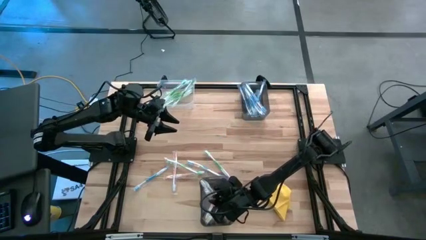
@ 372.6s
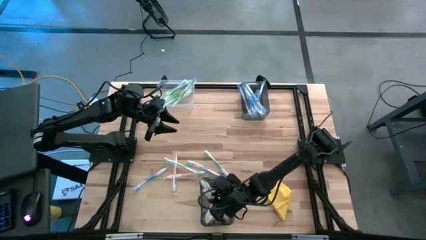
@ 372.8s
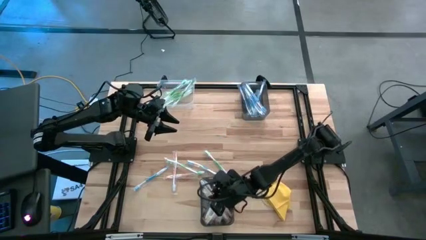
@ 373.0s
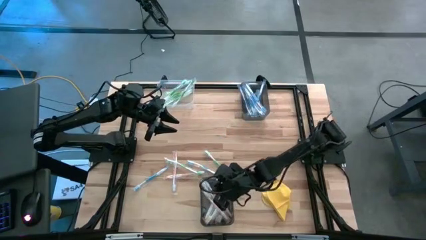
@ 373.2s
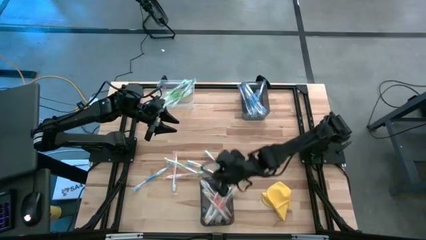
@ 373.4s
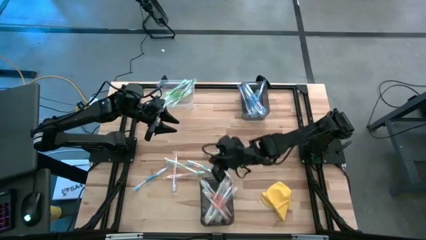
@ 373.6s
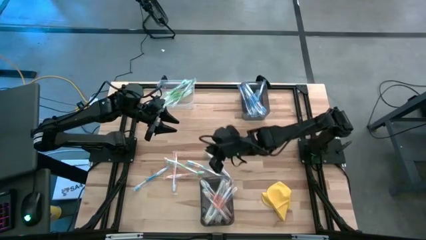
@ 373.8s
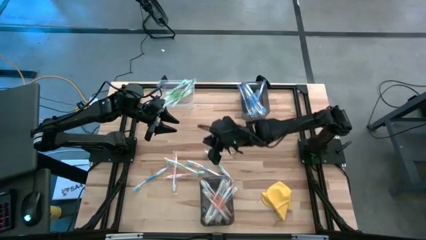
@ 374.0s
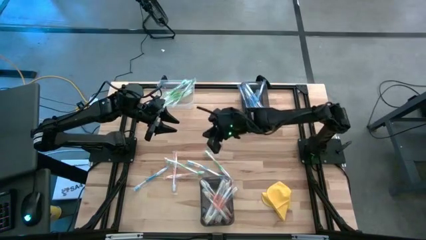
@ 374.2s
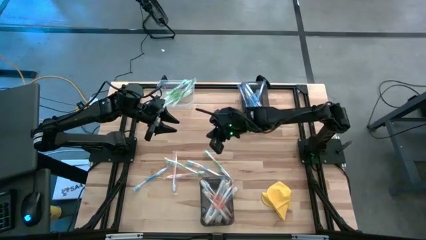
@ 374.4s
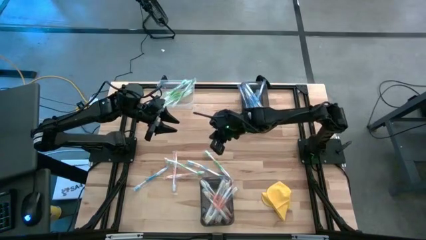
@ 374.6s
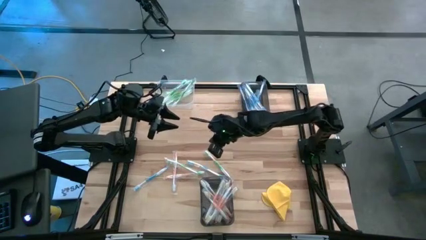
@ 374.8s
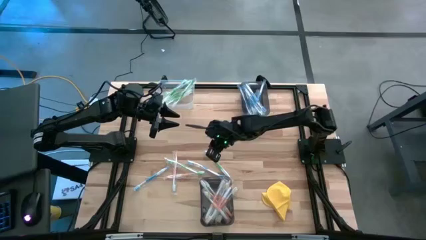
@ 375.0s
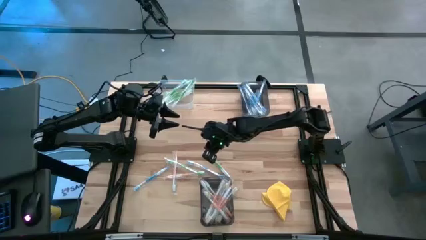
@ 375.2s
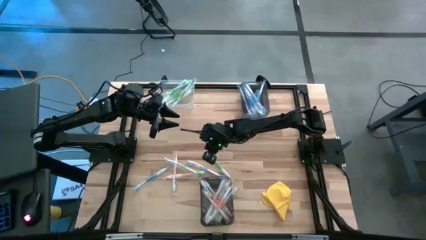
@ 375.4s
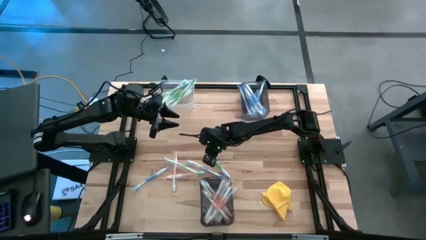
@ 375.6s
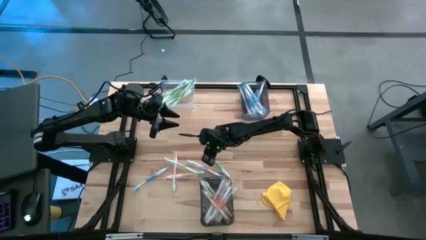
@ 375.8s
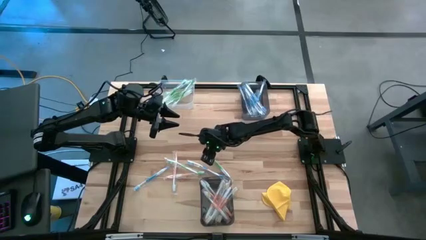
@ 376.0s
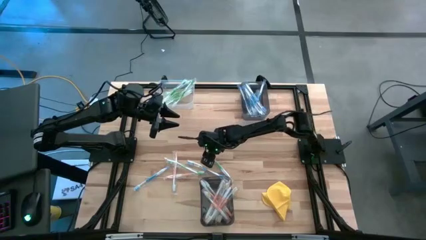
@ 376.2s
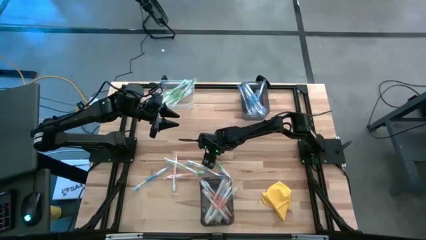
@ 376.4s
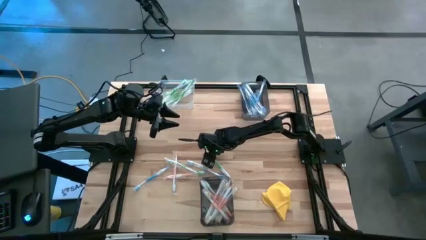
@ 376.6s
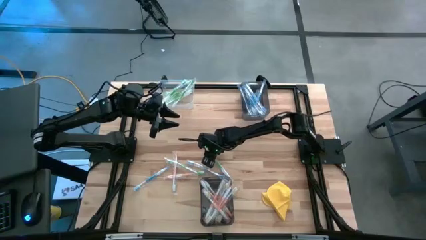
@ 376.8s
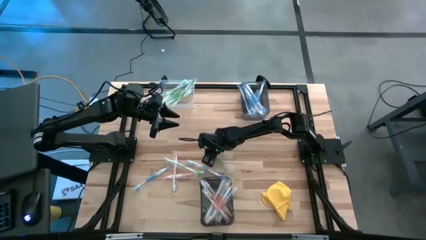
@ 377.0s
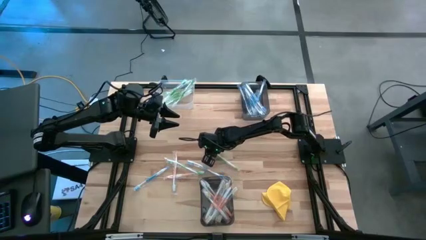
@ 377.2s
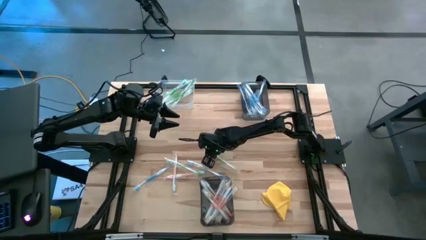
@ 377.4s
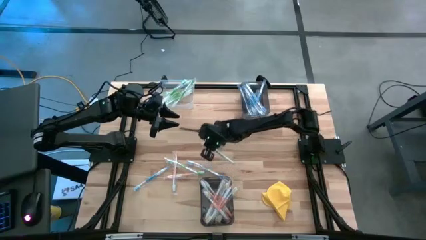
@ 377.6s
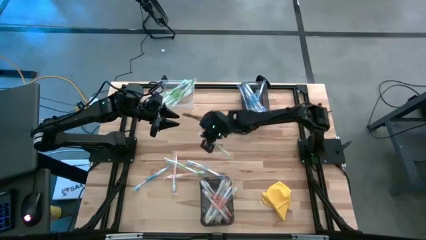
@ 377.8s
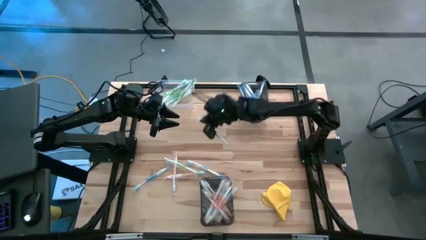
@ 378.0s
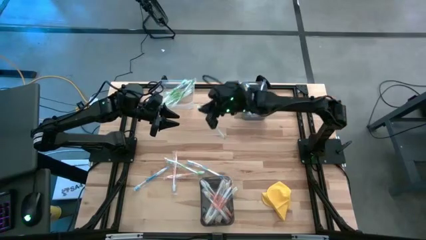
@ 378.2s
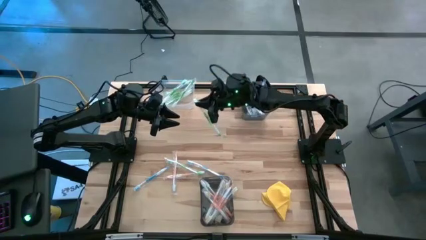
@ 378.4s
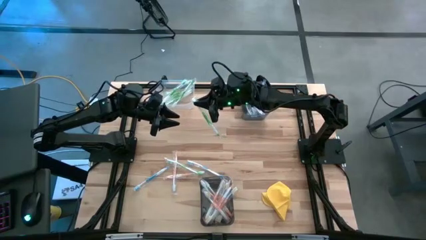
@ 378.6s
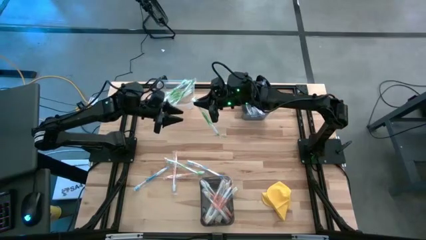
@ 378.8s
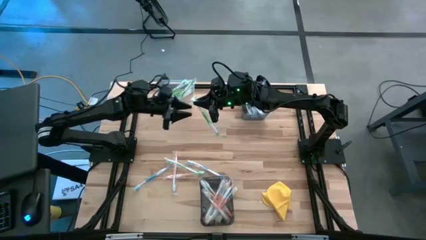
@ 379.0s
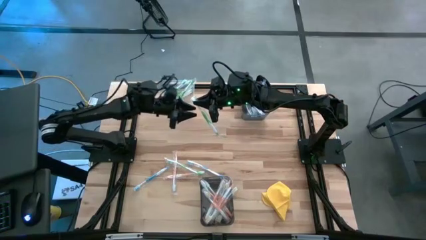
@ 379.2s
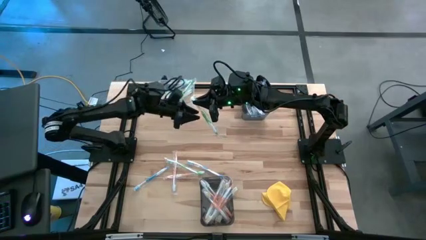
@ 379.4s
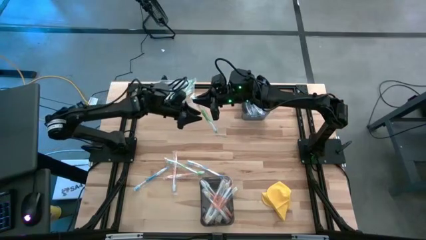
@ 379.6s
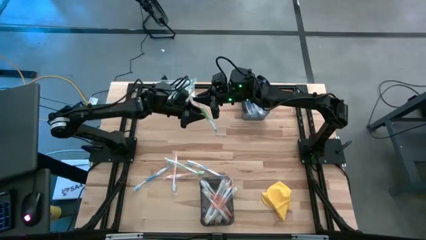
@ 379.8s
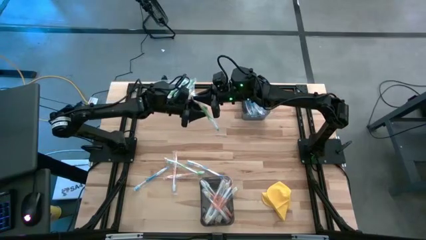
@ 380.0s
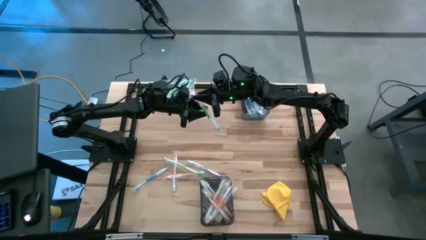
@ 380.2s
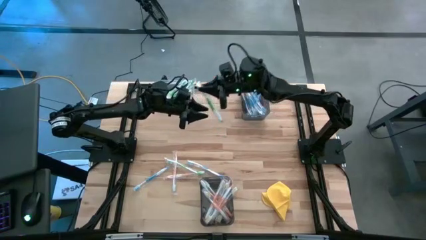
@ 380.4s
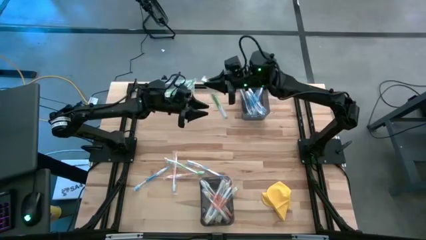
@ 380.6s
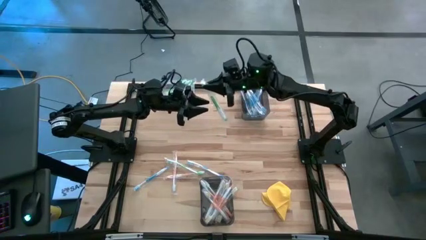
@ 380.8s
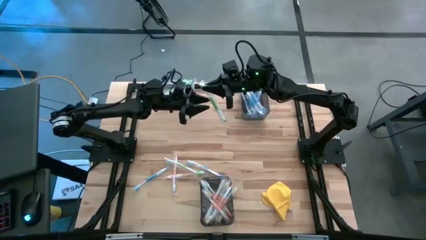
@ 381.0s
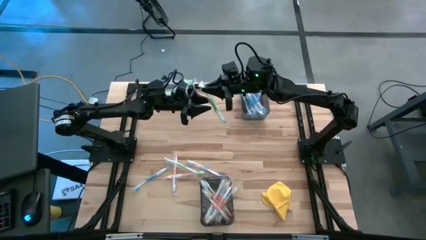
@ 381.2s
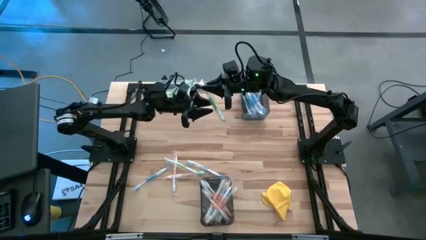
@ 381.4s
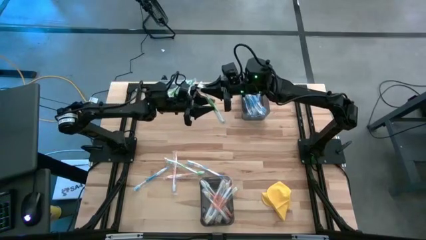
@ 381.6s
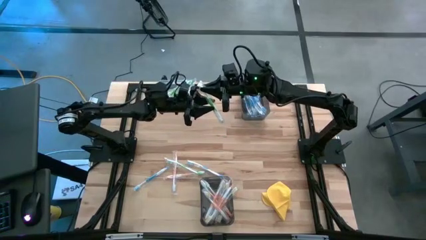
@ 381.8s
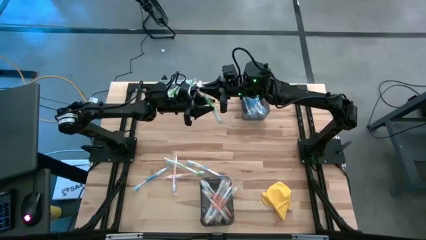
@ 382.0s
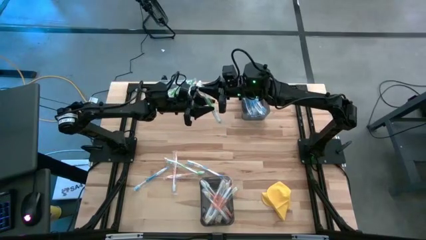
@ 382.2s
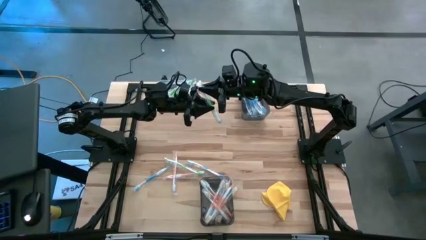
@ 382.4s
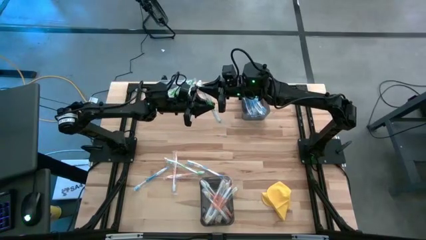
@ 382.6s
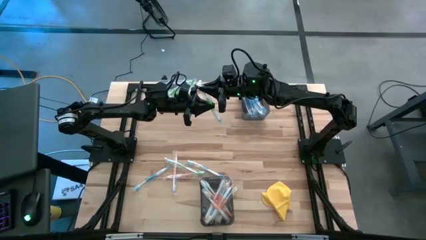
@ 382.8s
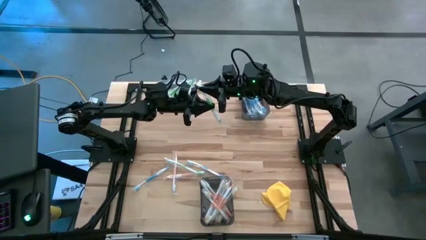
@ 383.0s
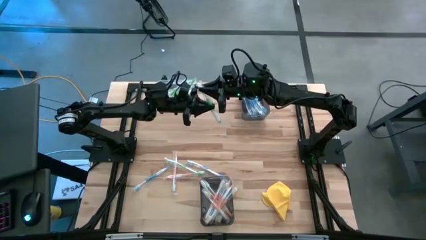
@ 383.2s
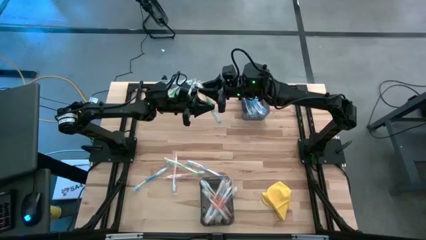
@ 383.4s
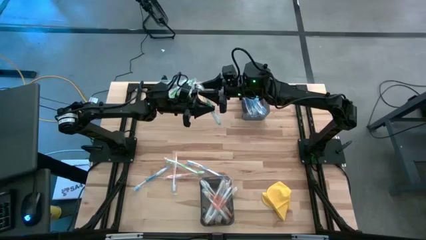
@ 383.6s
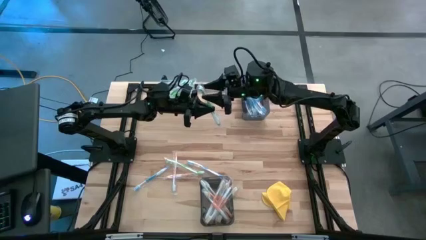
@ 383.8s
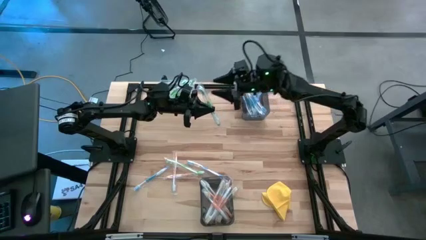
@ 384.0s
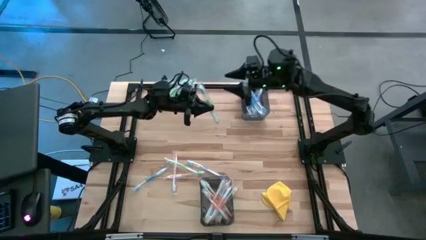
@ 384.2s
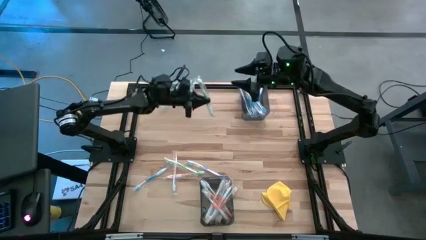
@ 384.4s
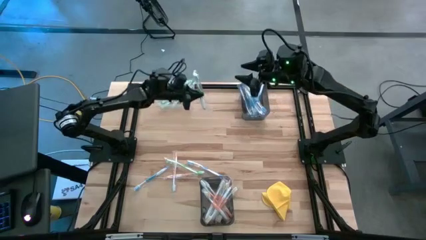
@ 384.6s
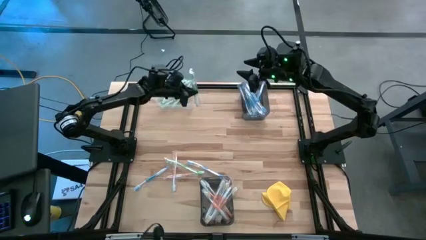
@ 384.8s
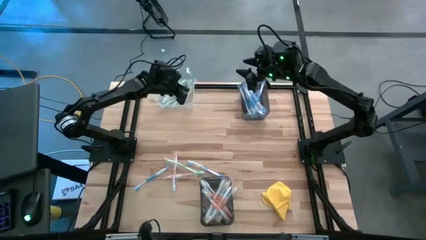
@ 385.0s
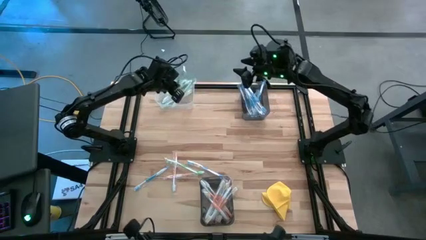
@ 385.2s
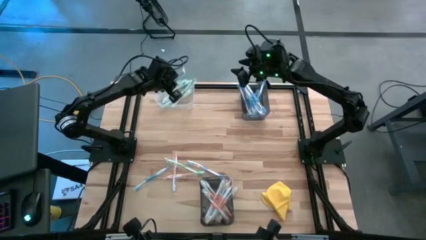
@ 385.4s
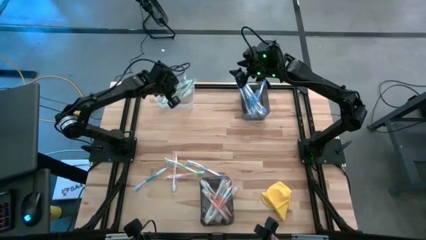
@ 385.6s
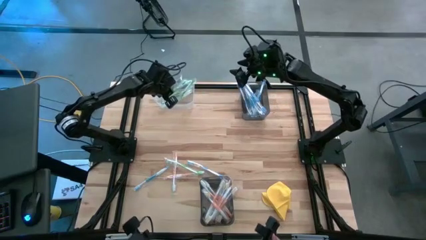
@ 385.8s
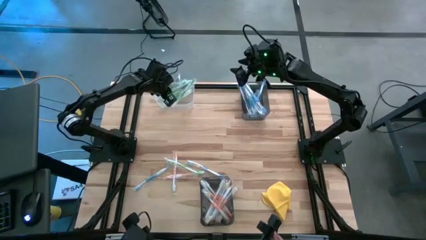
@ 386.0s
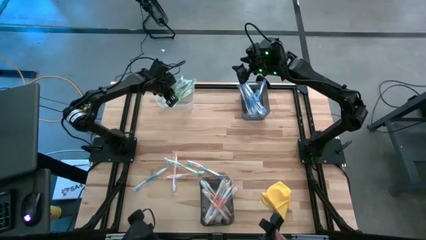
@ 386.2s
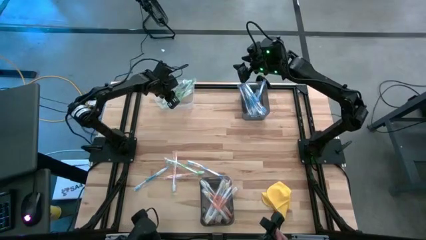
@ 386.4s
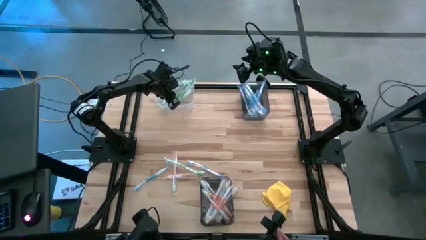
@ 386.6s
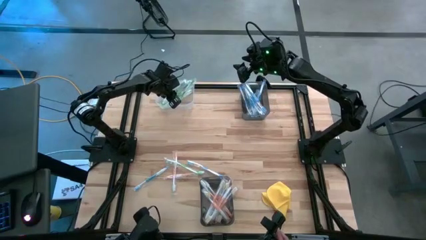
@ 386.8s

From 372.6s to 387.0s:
Task: Pick & Place Toothbrushes
Put the green toothbrush into the transparent bin
